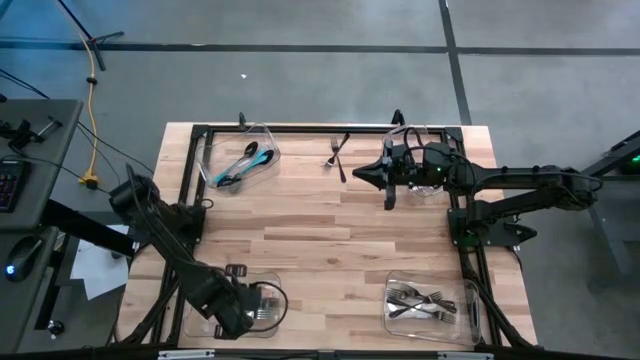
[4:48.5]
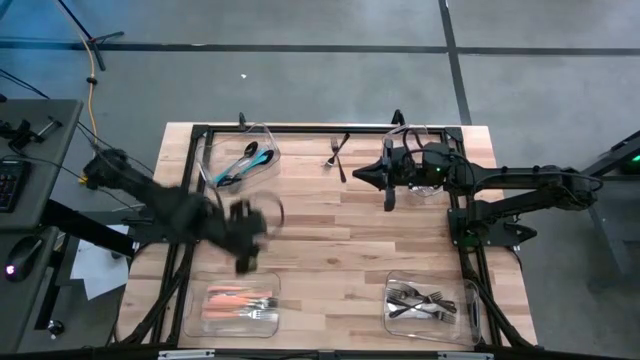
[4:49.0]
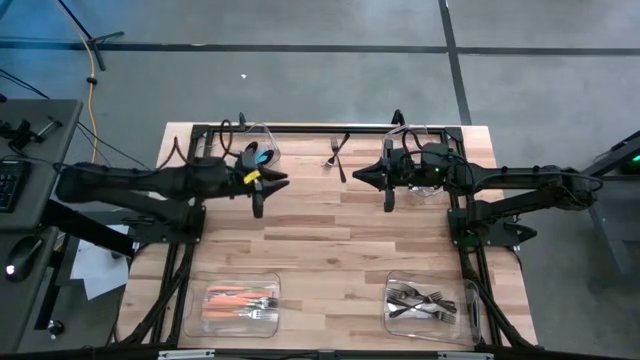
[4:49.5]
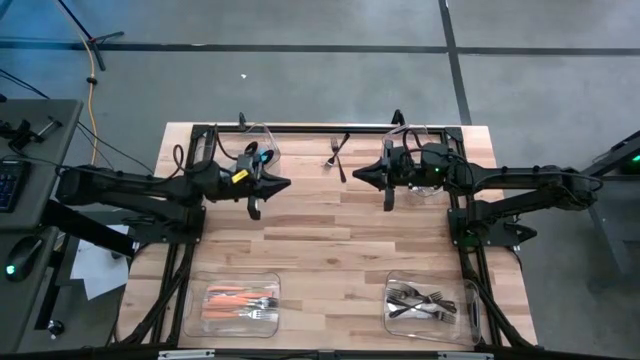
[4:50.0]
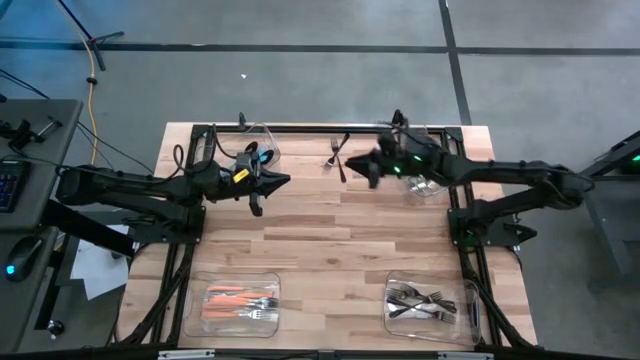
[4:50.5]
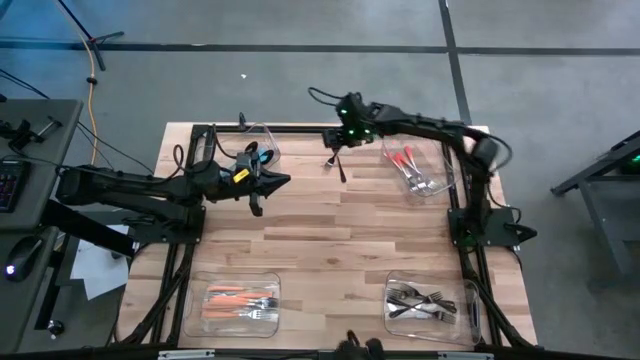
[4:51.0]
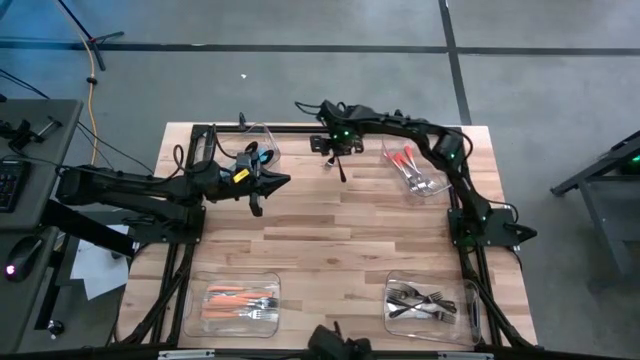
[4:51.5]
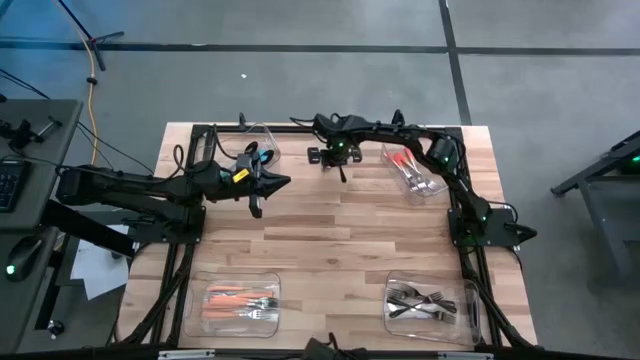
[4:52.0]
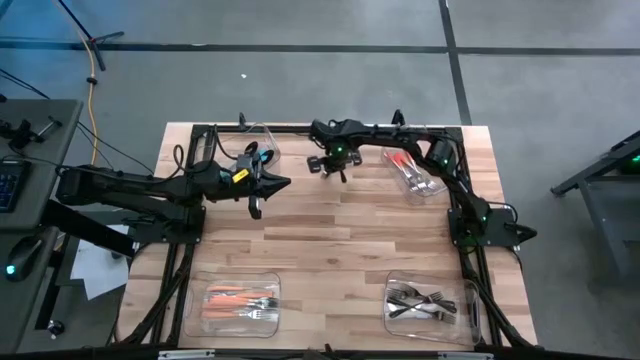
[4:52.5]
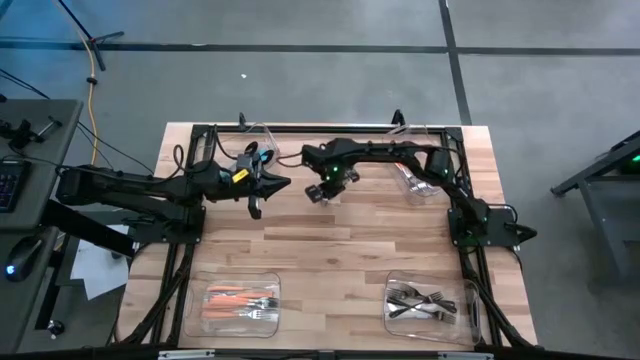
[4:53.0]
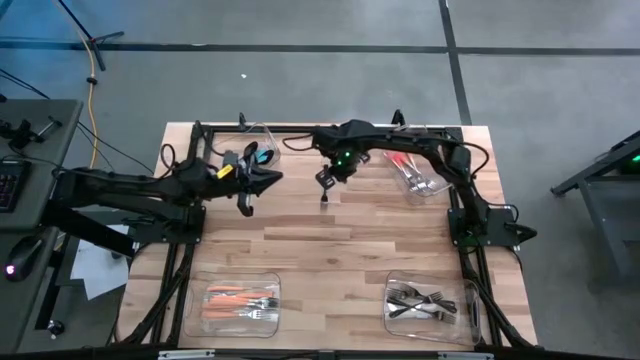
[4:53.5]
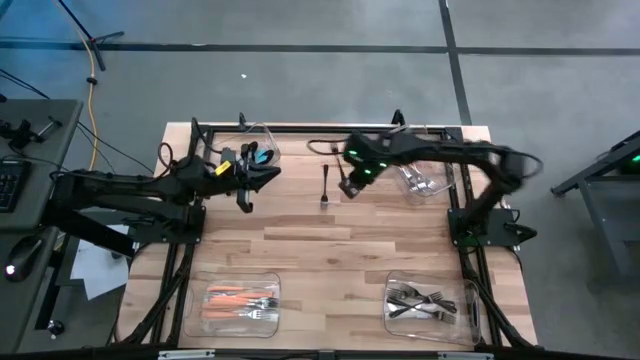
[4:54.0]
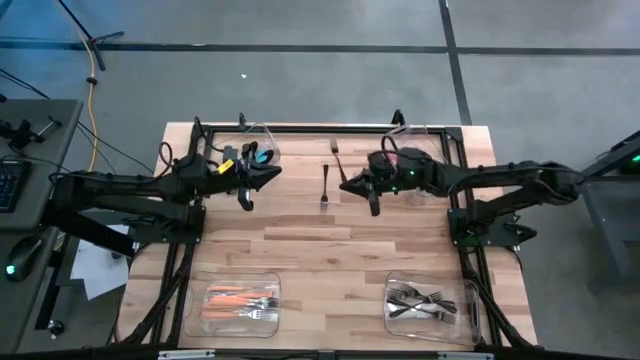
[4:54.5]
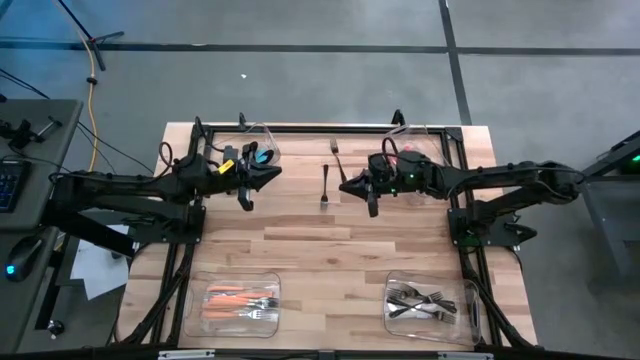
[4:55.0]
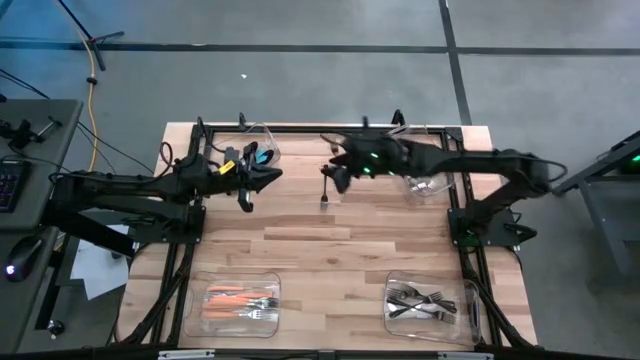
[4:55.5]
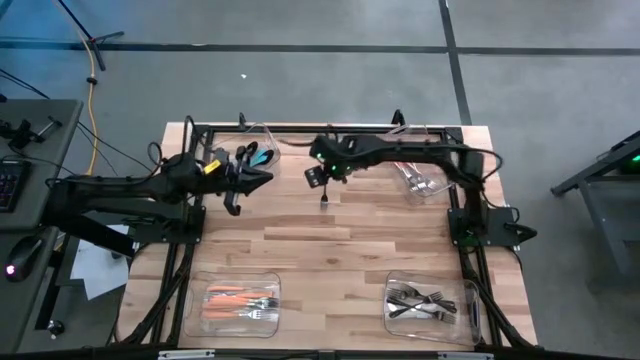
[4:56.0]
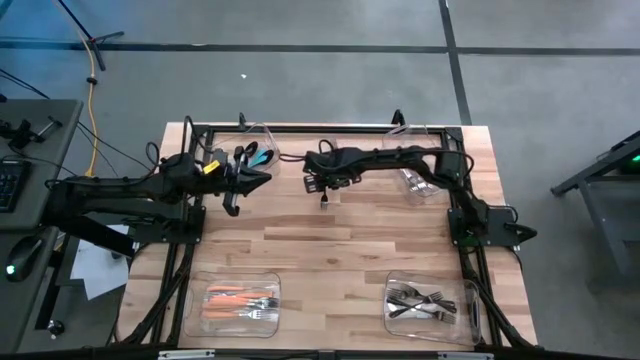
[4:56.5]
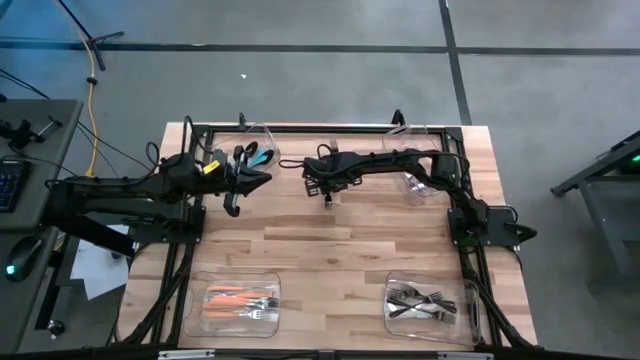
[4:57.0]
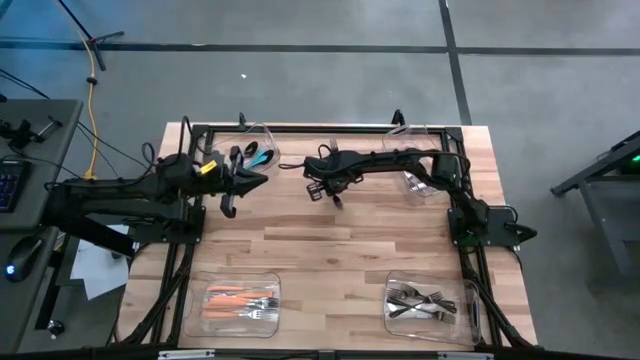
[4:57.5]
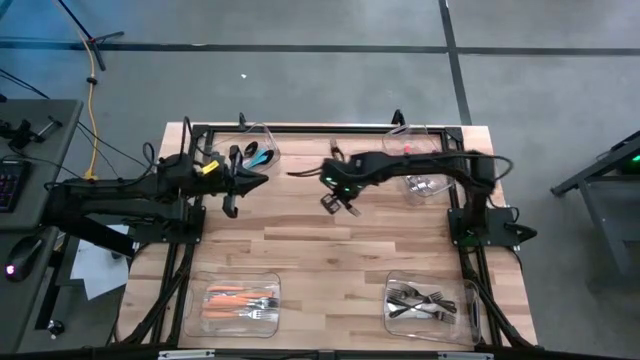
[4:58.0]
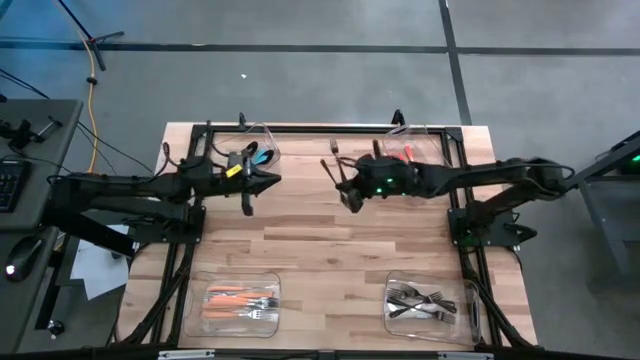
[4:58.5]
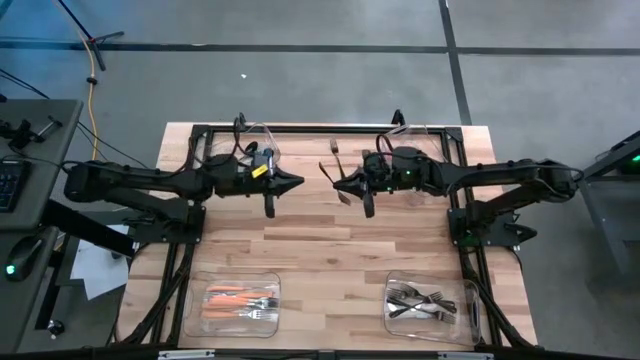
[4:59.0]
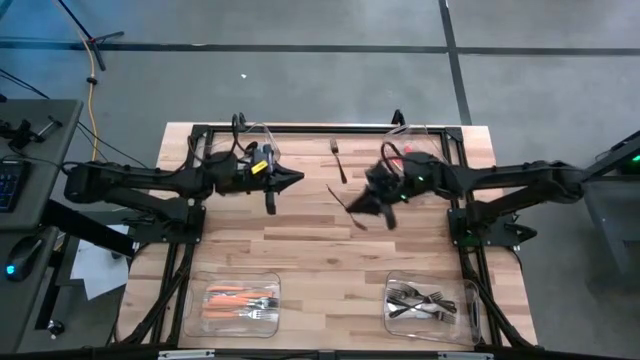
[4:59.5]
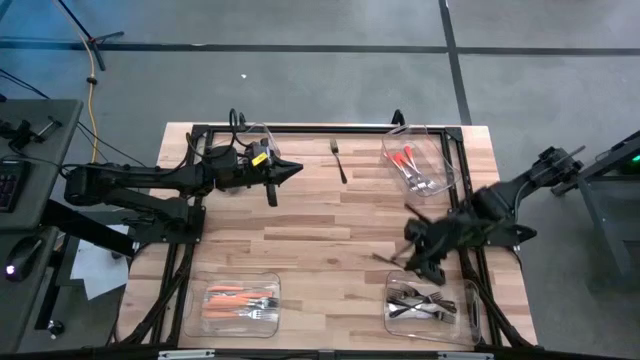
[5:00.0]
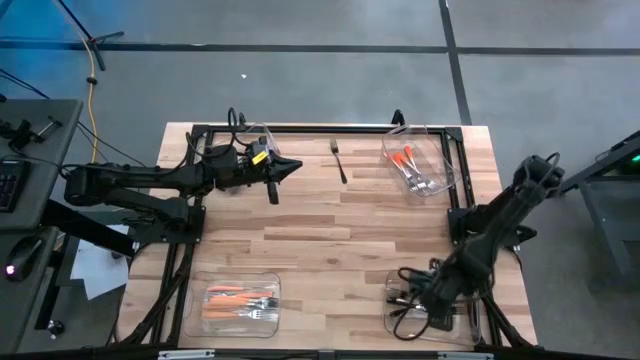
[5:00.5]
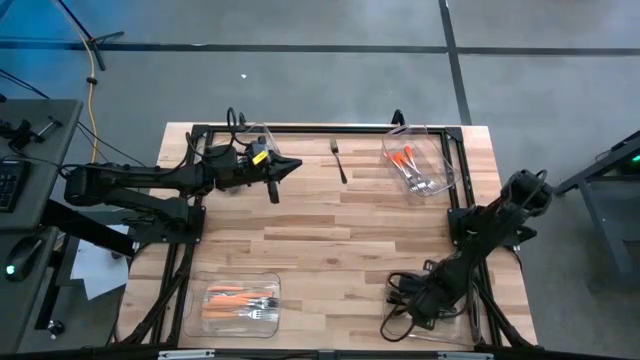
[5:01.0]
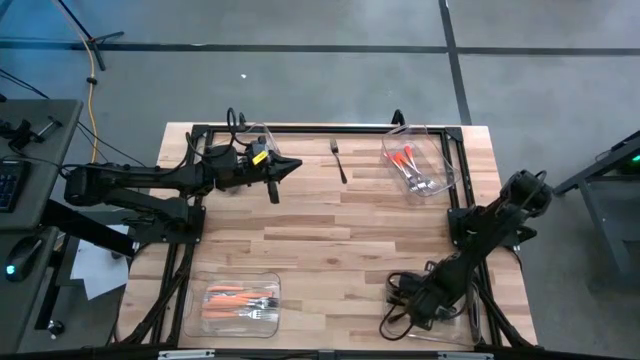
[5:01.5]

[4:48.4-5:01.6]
Task: Sort silverware by color (type)
Put the black fork into the bottom right transparent bin

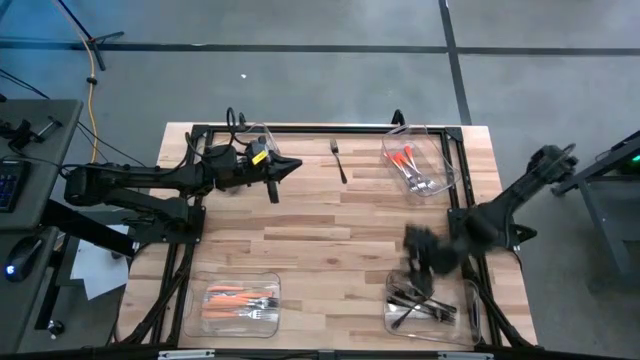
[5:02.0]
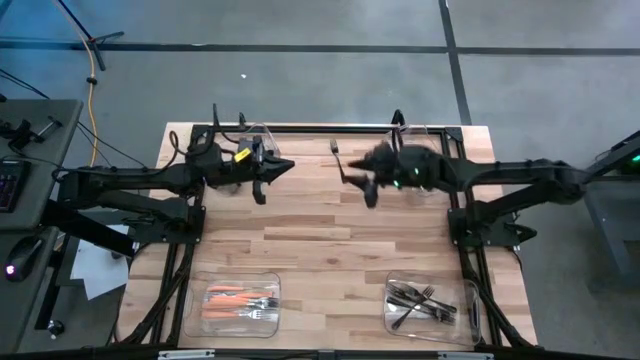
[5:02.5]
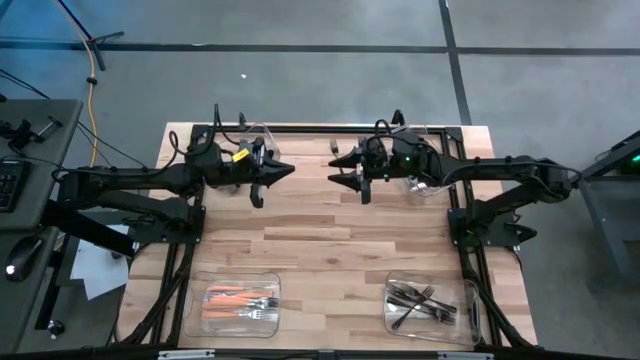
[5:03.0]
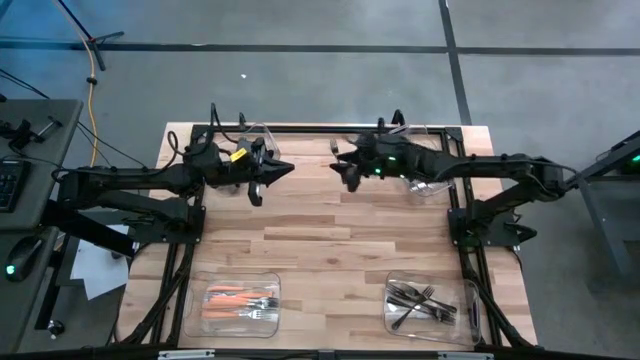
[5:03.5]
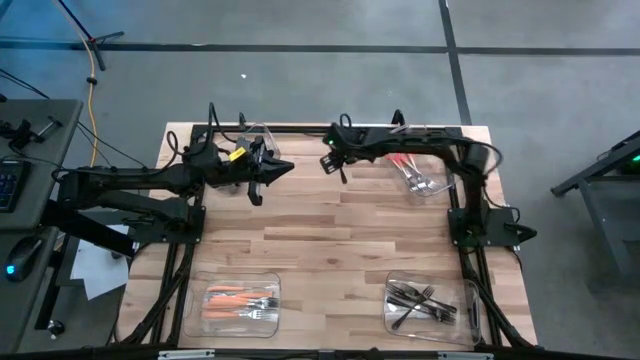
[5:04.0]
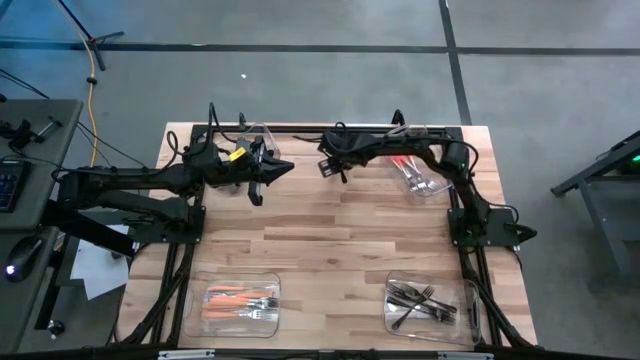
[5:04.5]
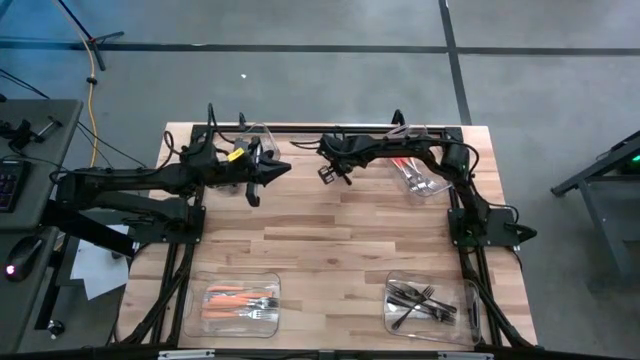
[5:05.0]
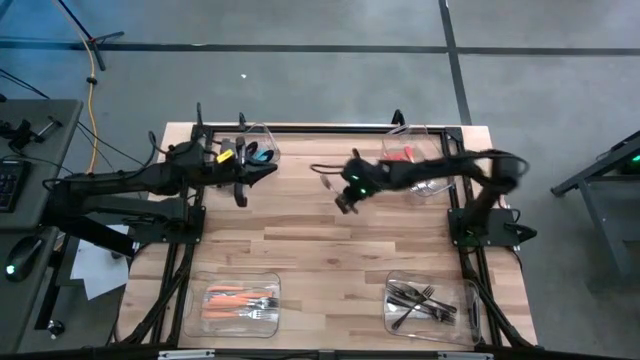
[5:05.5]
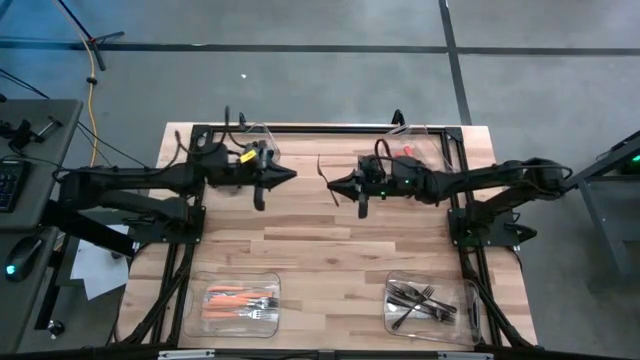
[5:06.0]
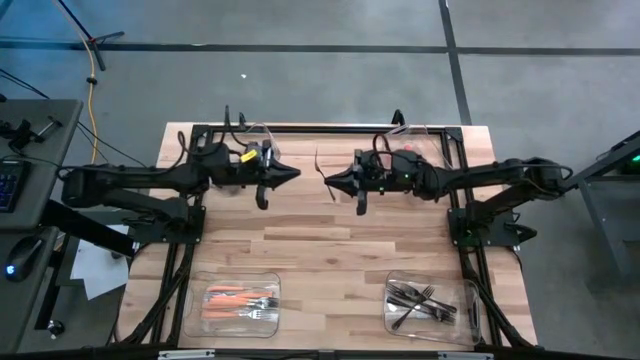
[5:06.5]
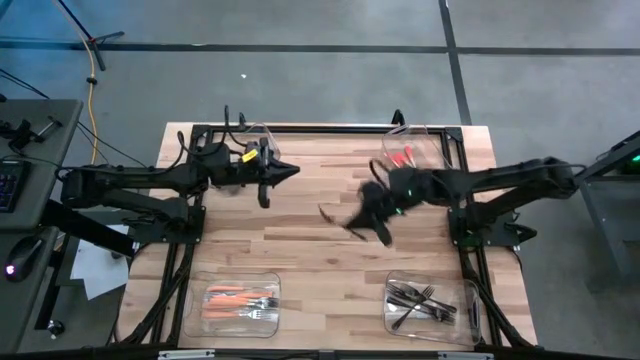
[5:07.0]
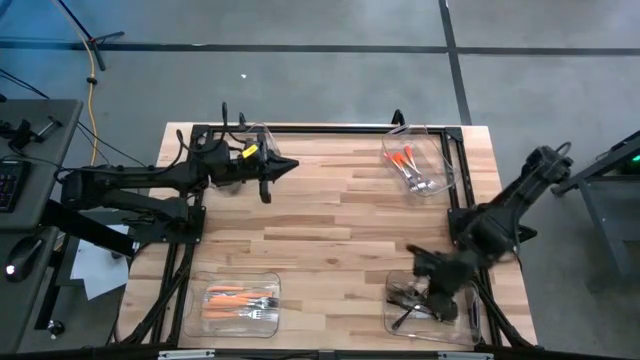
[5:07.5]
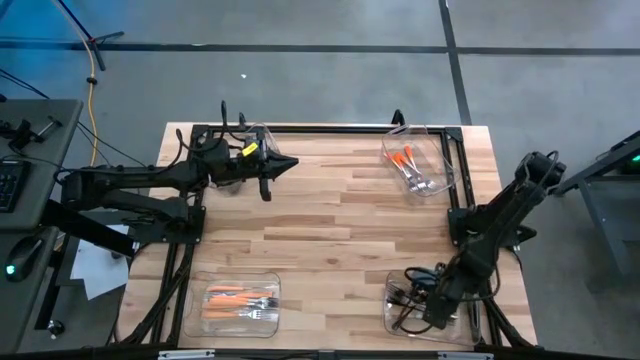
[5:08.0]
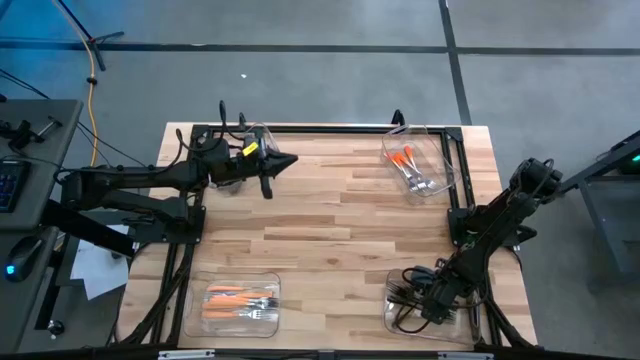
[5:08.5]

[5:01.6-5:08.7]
Put the black fork into the bottom right transparent bin
